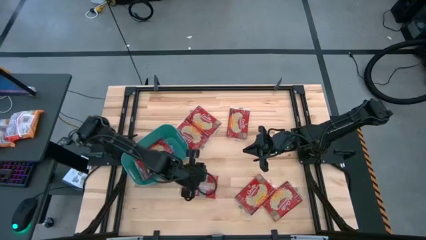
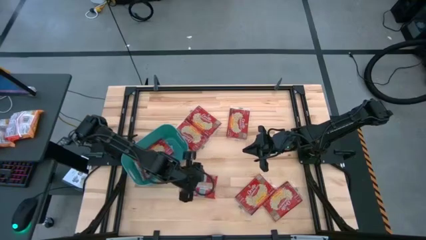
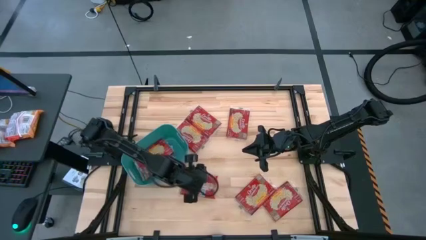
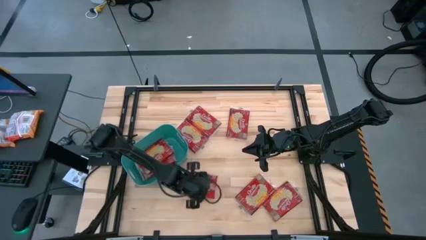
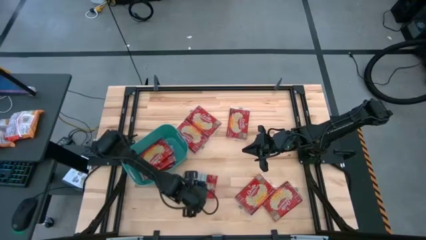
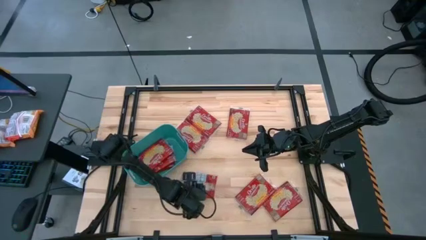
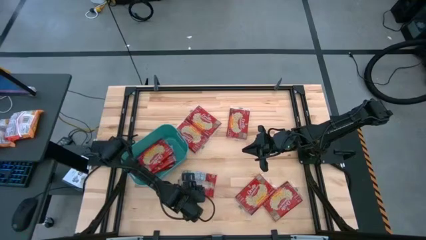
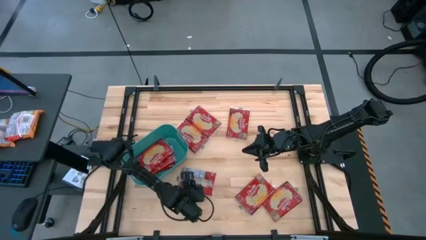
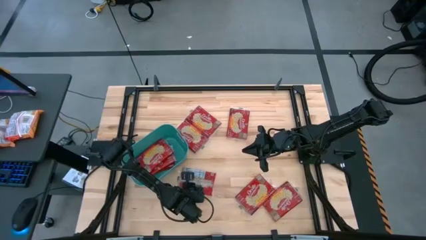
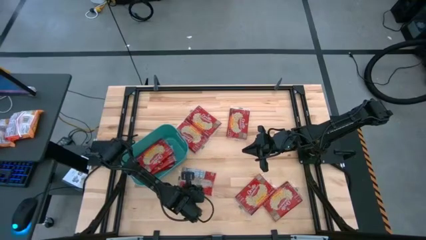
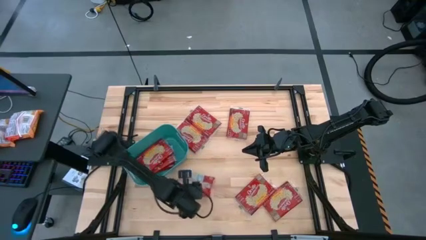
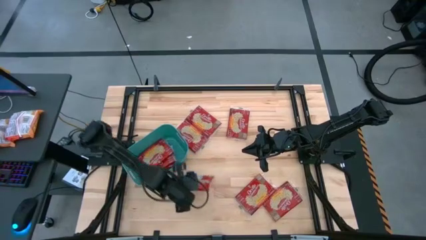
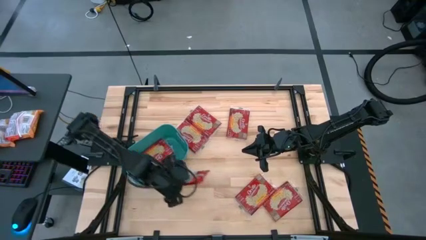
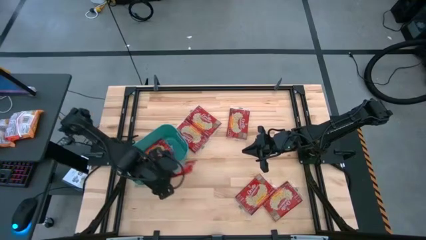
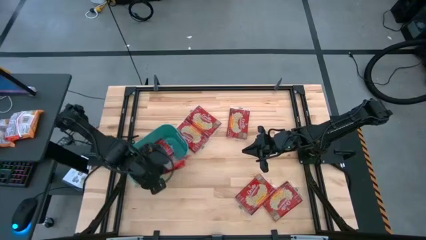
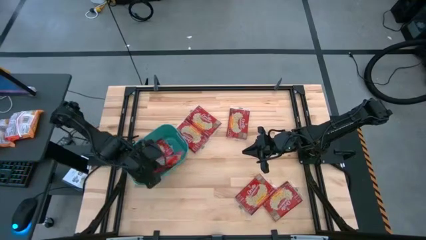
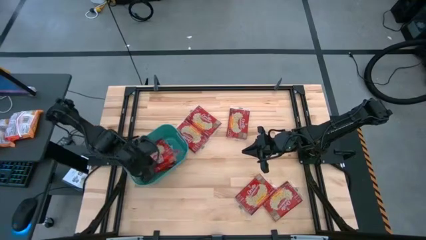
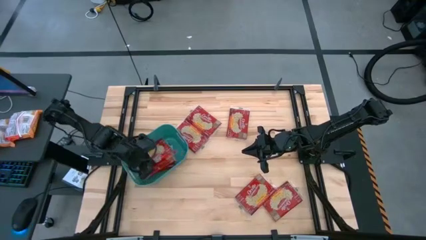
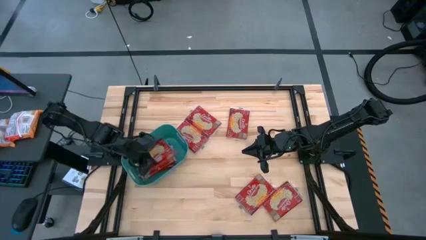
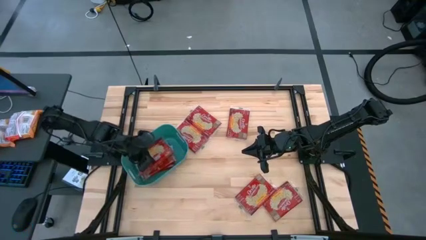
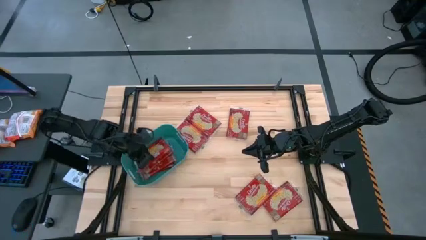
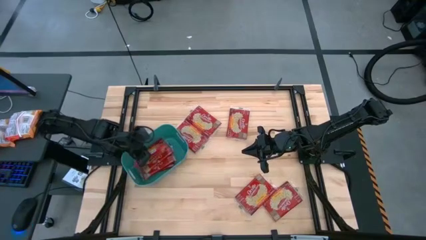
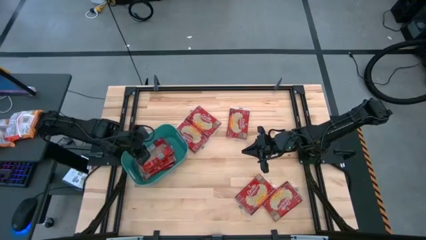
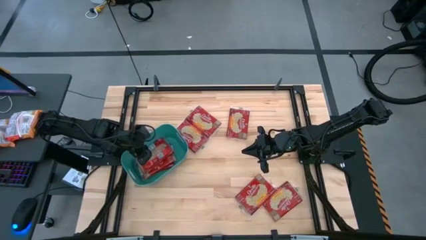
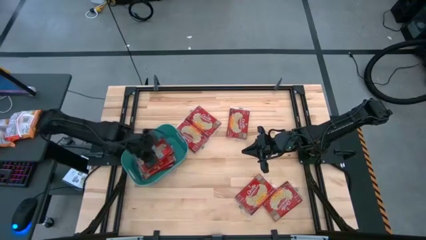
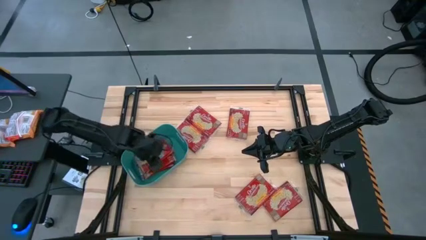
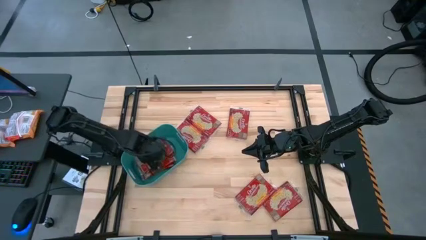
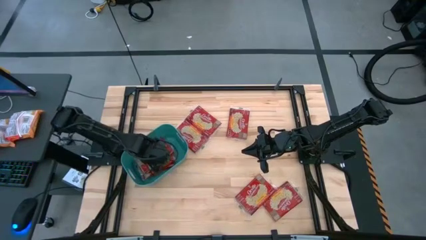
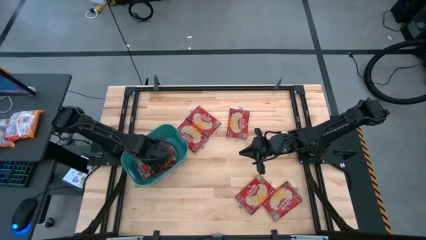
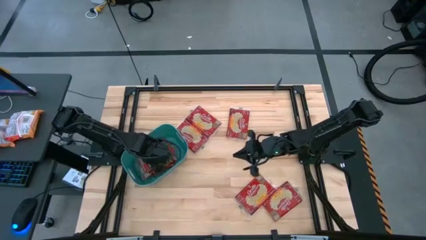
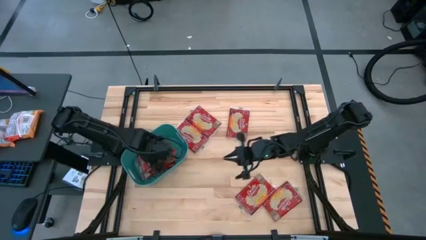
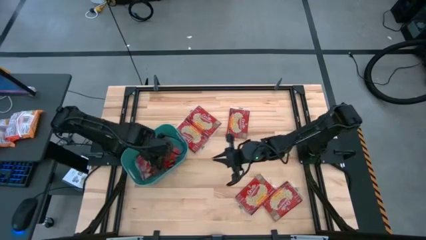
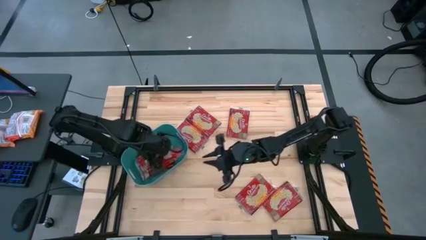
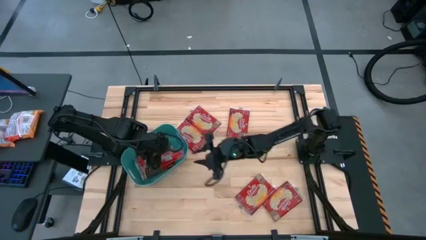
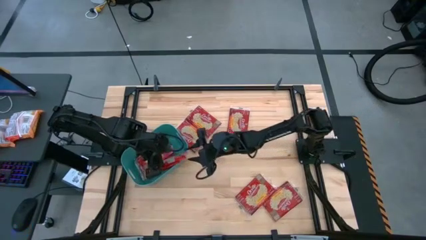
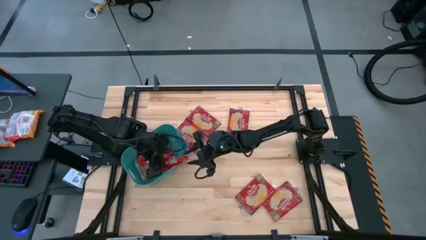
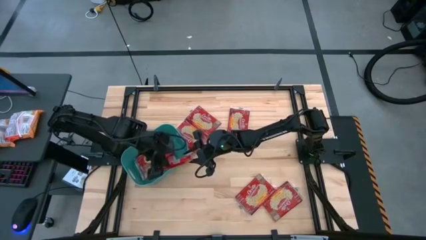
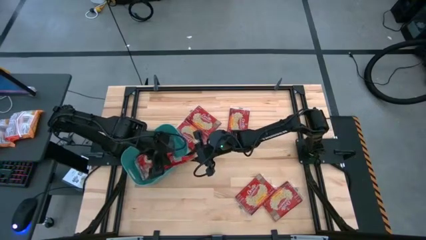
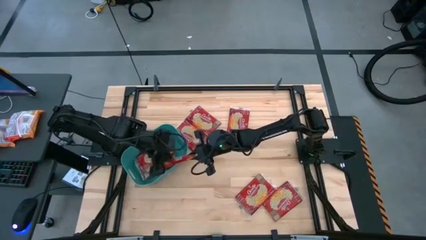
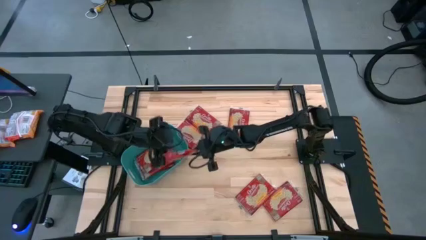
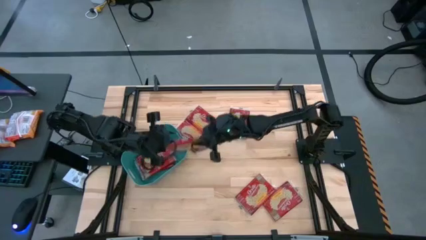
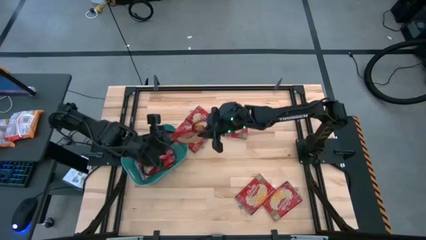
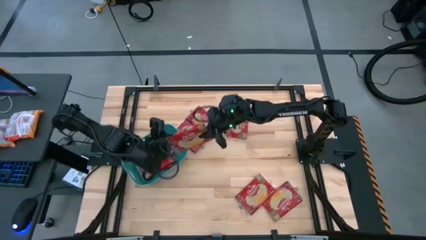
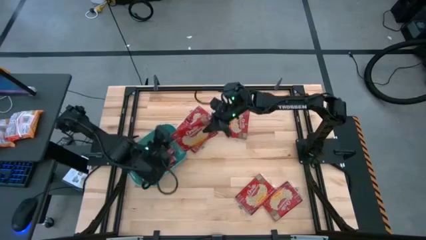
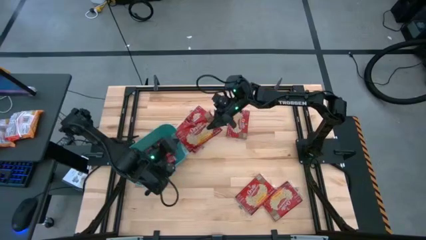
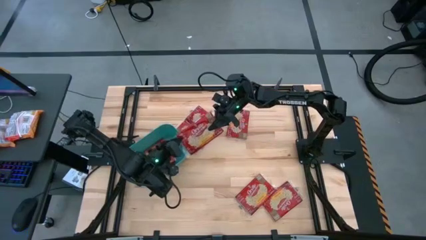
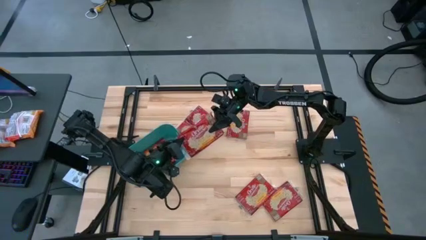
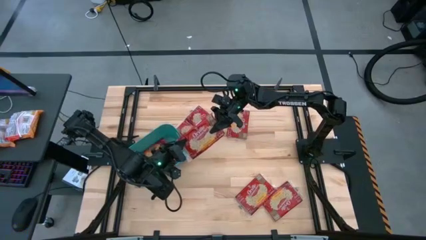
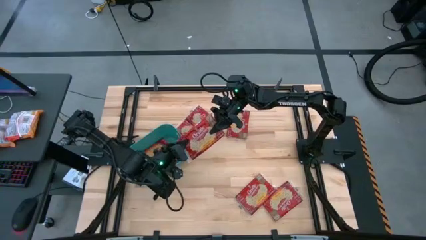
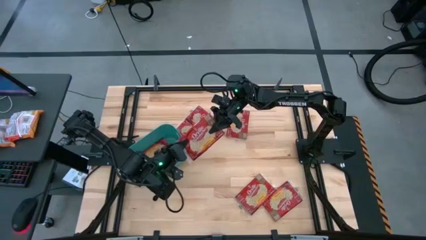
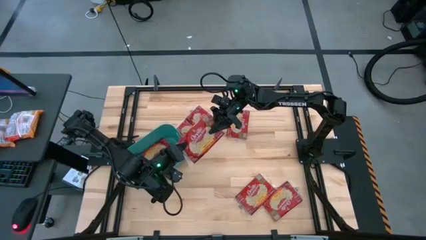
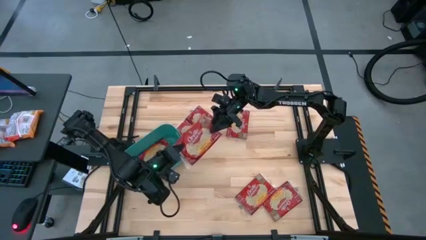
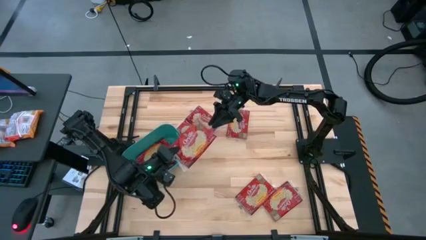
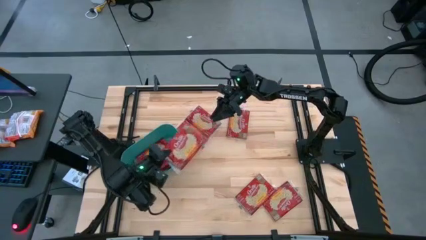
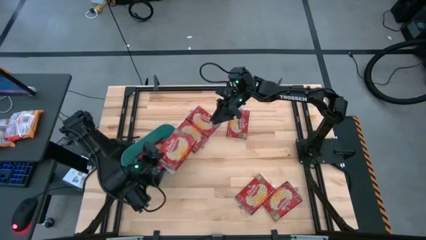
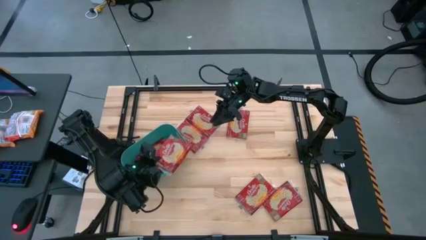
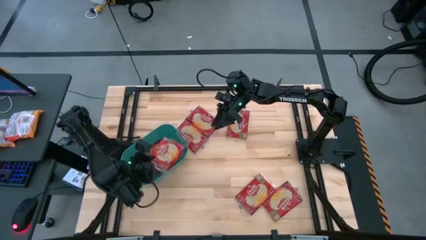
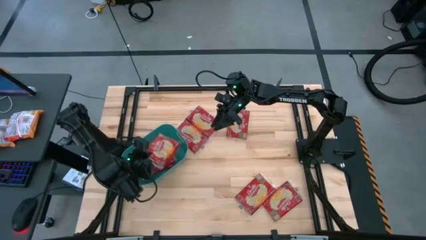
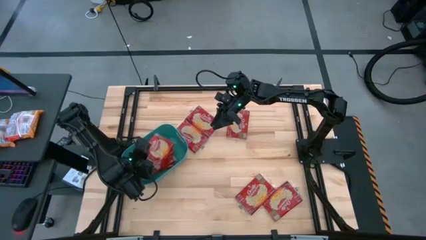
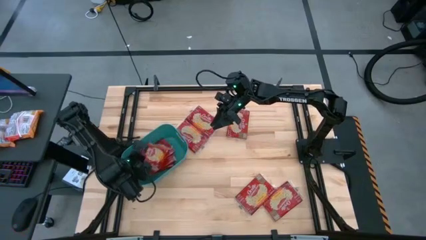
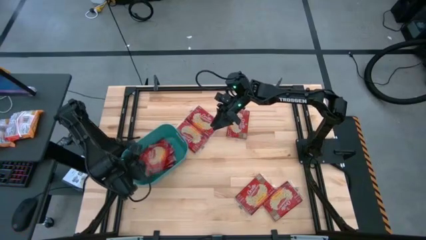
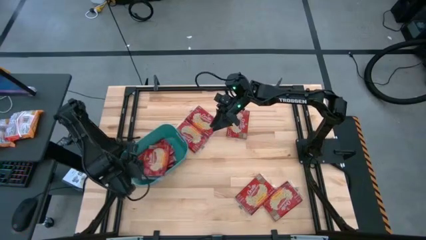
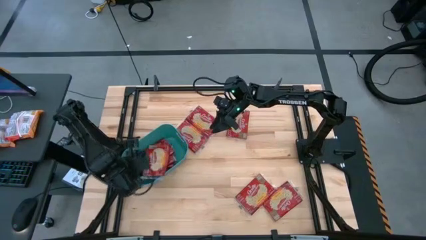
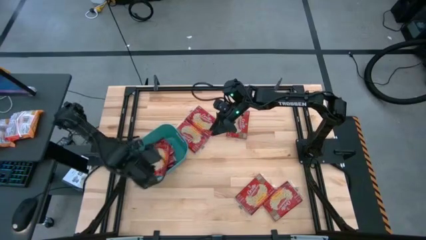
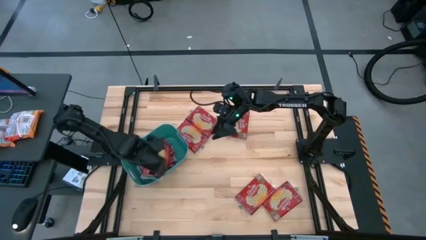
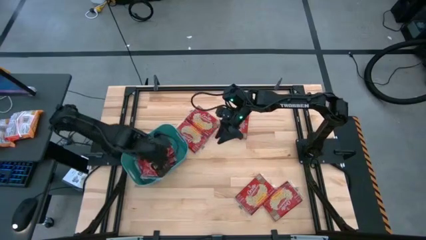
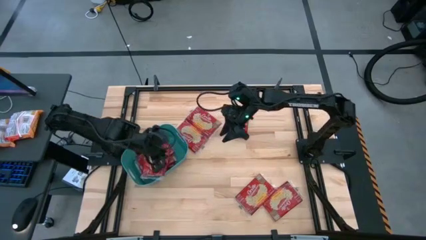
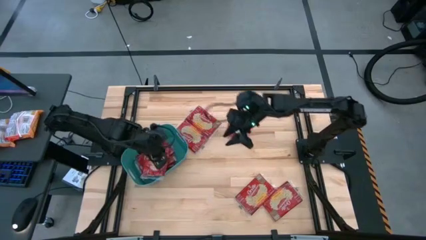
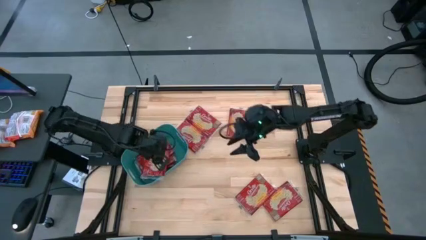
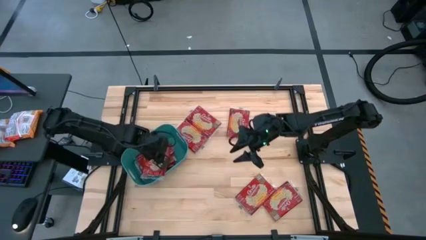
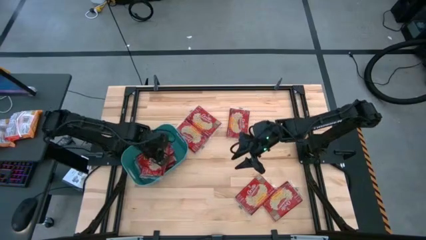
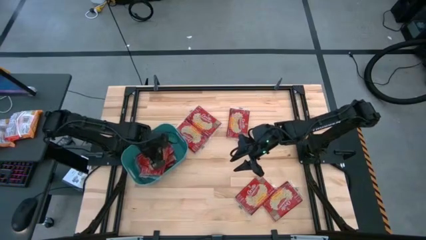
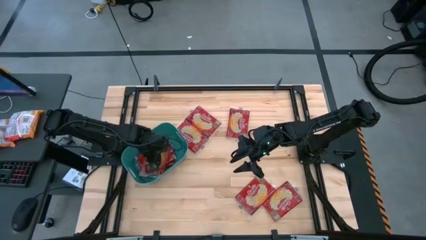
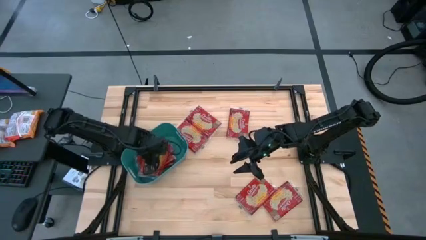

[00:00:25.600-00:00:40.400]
Task: Sort popcorn bags into baskets
Put the red popcorn bag into the green bin
